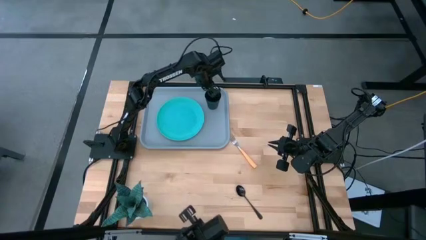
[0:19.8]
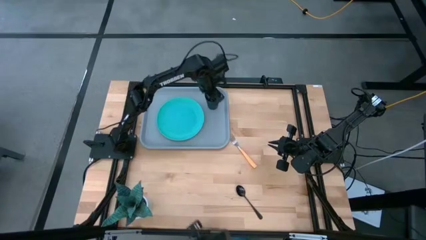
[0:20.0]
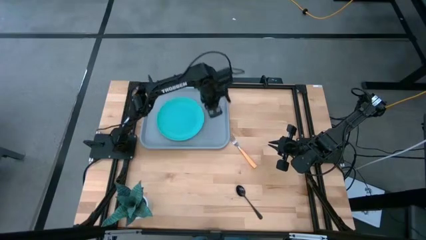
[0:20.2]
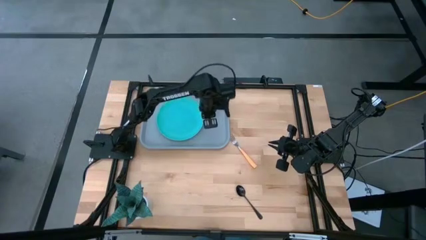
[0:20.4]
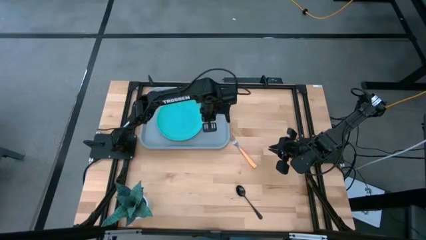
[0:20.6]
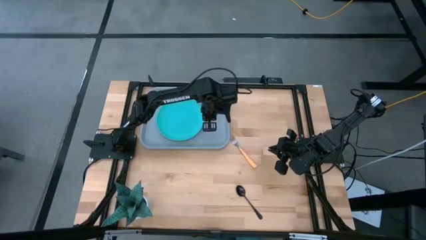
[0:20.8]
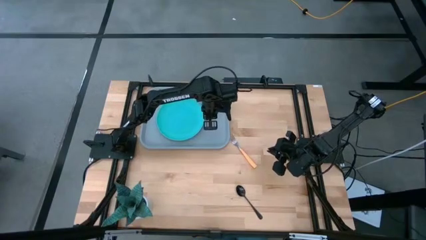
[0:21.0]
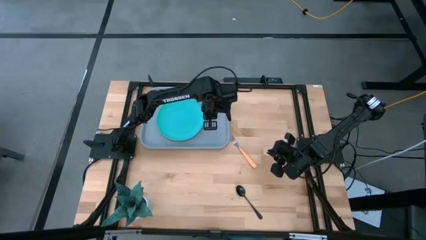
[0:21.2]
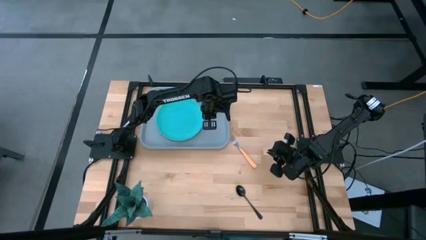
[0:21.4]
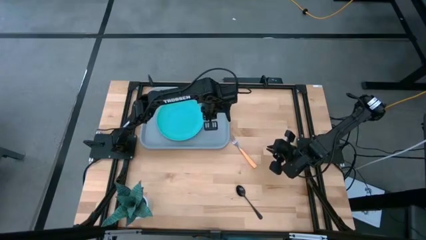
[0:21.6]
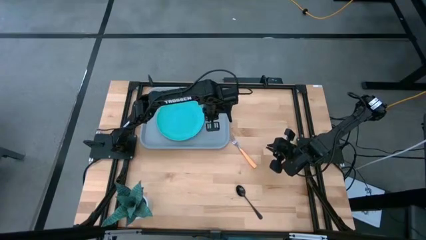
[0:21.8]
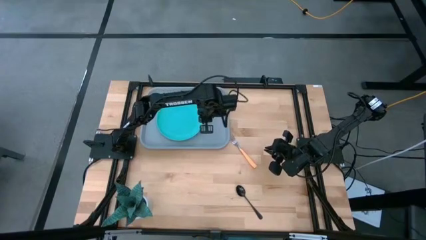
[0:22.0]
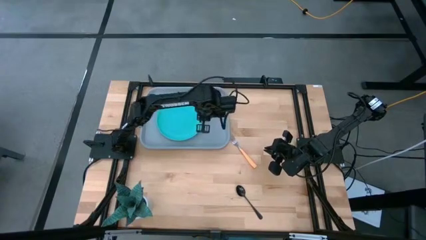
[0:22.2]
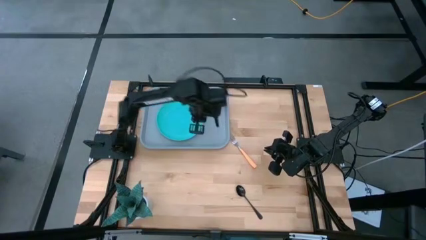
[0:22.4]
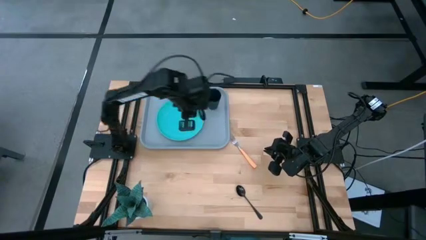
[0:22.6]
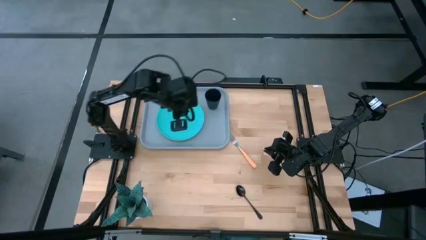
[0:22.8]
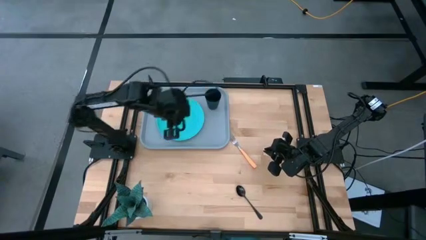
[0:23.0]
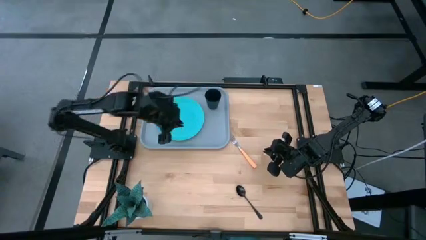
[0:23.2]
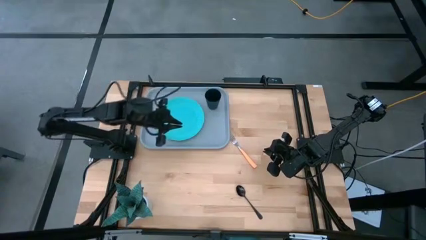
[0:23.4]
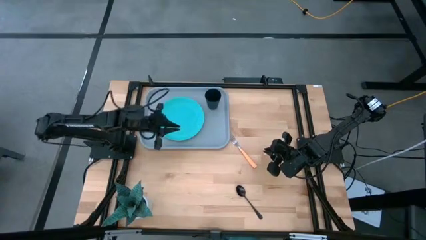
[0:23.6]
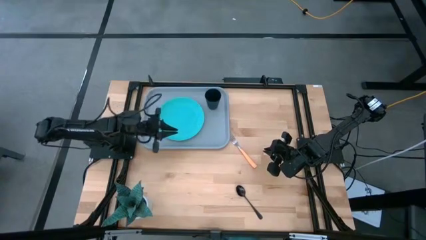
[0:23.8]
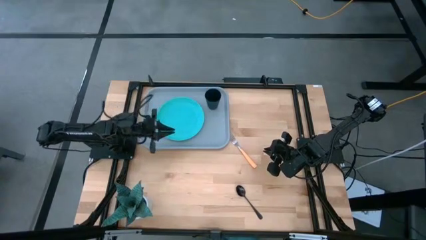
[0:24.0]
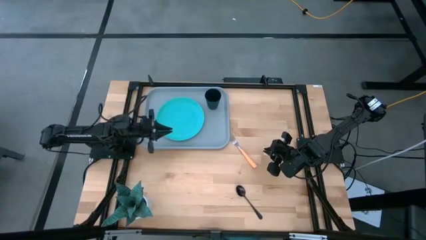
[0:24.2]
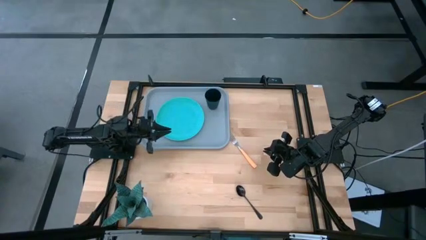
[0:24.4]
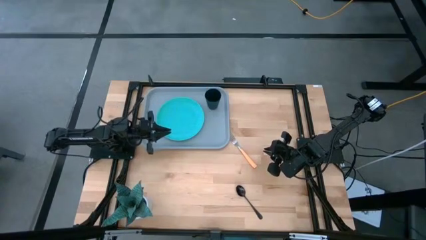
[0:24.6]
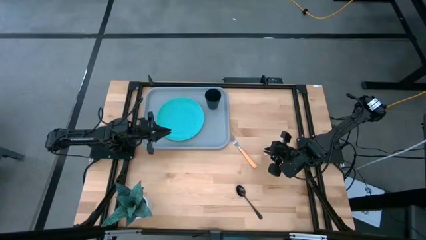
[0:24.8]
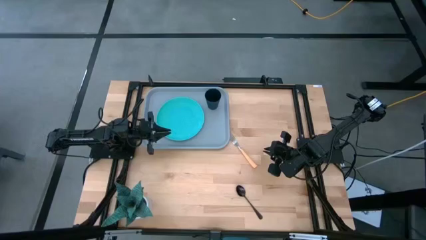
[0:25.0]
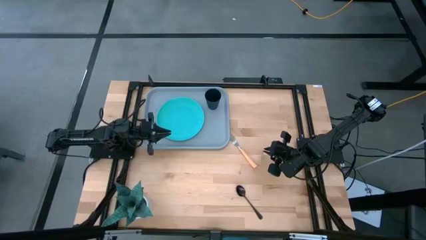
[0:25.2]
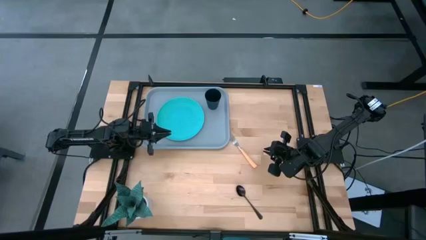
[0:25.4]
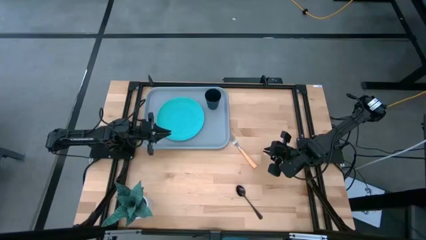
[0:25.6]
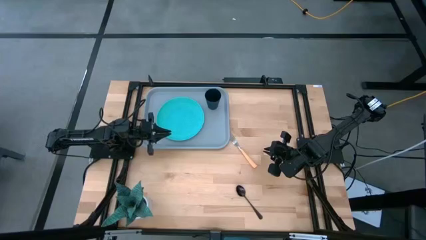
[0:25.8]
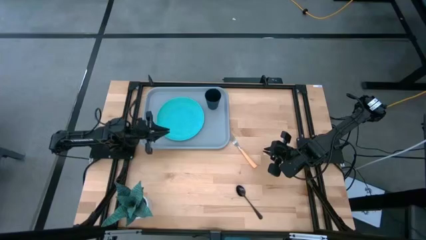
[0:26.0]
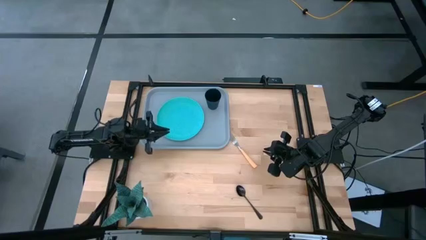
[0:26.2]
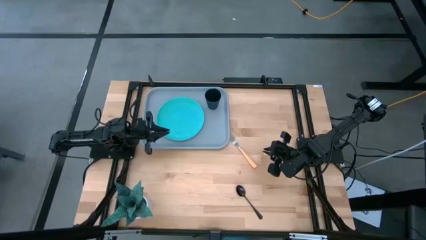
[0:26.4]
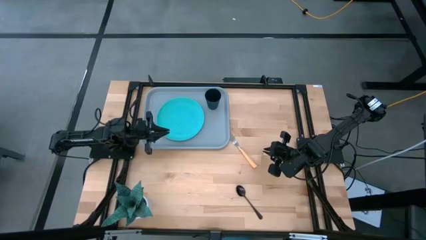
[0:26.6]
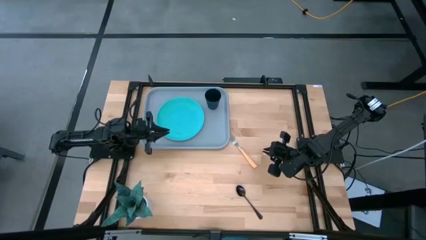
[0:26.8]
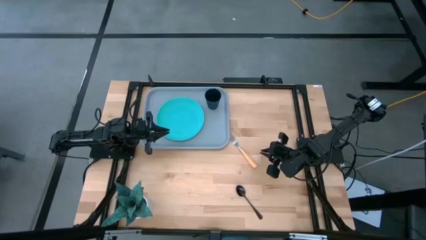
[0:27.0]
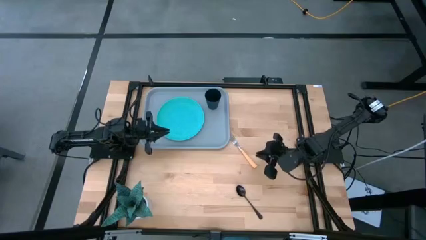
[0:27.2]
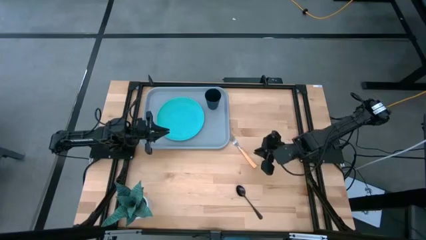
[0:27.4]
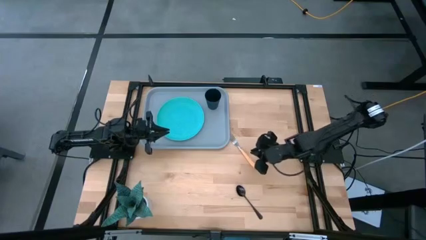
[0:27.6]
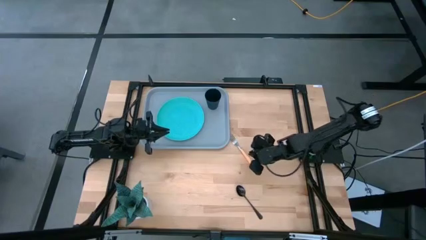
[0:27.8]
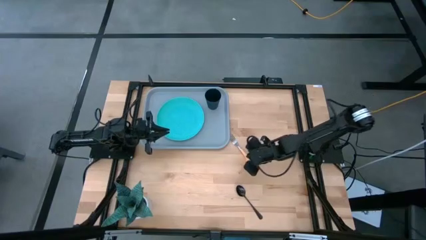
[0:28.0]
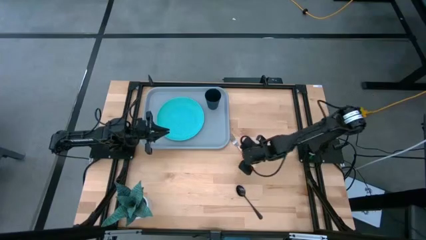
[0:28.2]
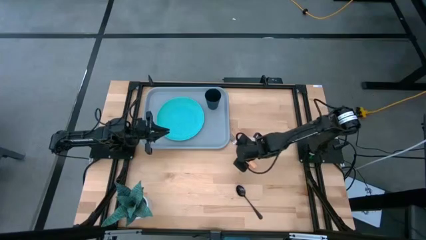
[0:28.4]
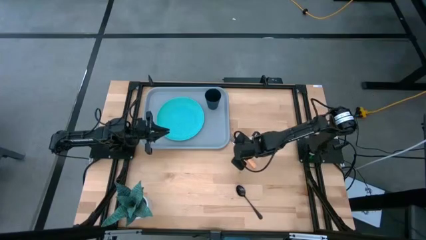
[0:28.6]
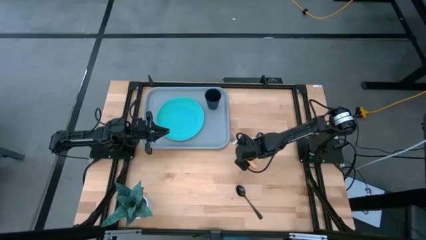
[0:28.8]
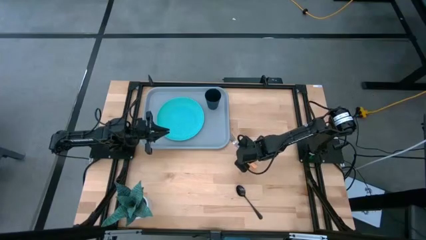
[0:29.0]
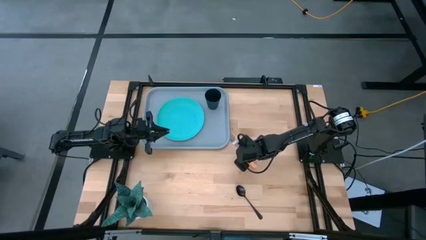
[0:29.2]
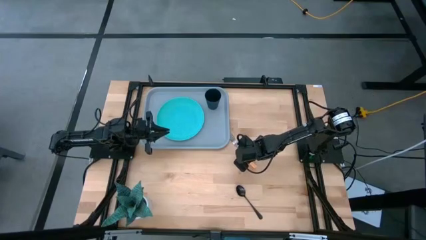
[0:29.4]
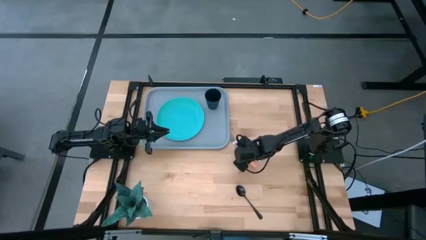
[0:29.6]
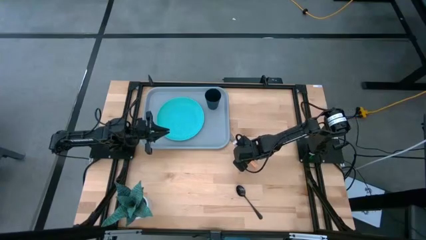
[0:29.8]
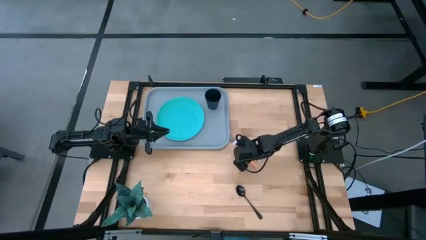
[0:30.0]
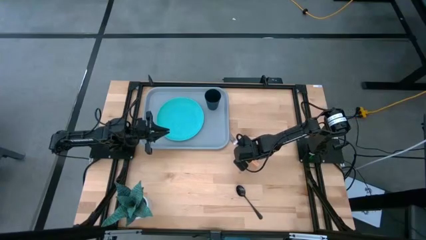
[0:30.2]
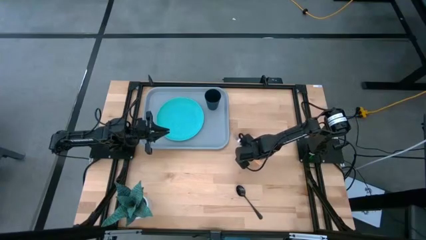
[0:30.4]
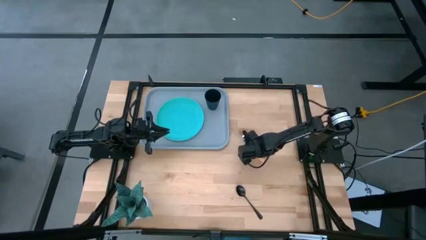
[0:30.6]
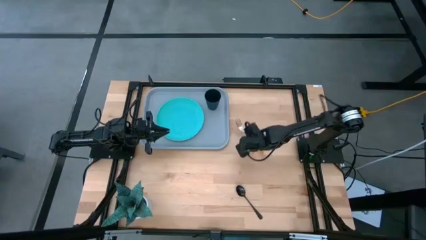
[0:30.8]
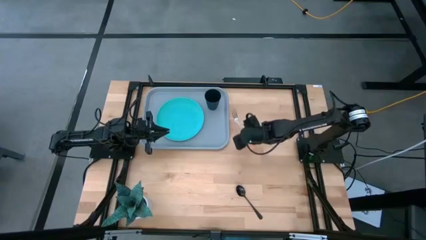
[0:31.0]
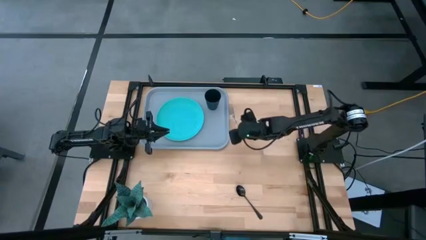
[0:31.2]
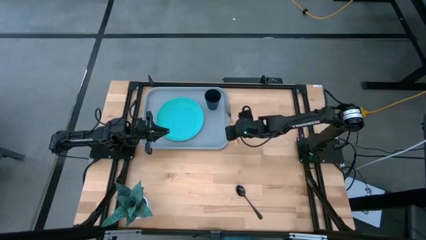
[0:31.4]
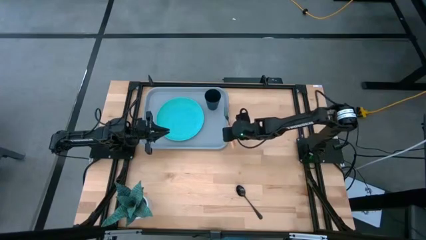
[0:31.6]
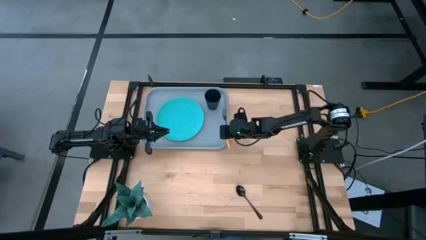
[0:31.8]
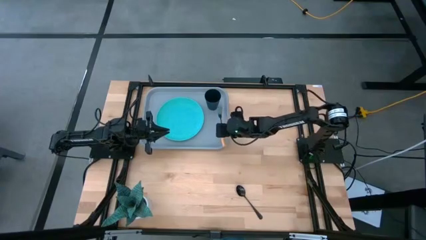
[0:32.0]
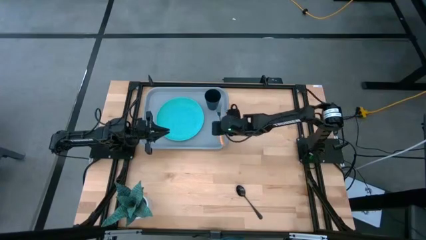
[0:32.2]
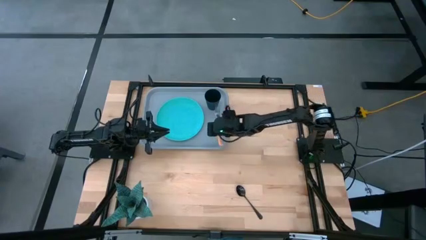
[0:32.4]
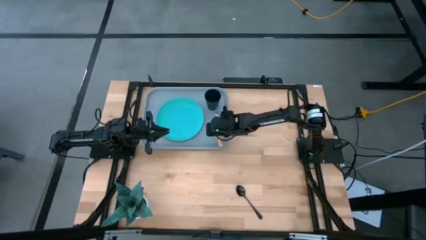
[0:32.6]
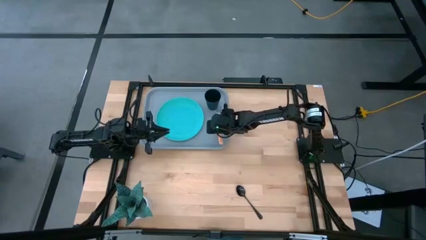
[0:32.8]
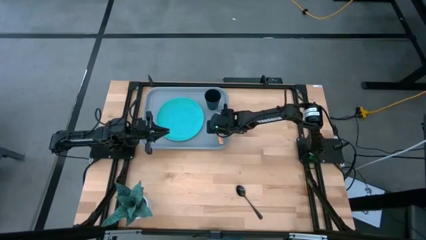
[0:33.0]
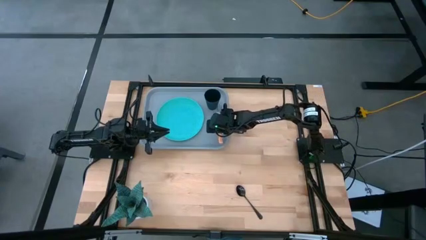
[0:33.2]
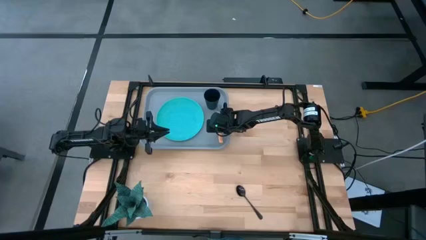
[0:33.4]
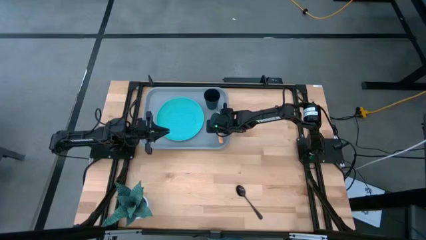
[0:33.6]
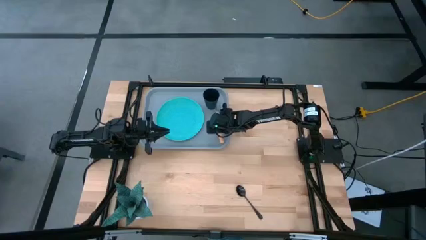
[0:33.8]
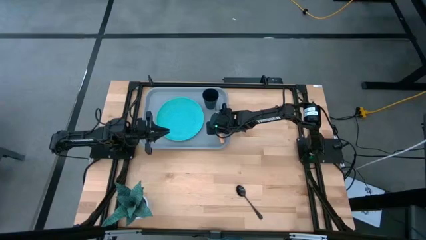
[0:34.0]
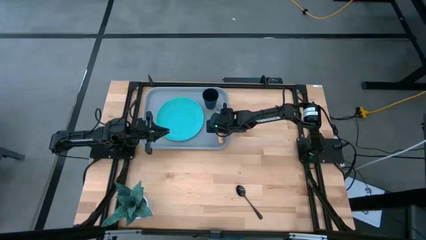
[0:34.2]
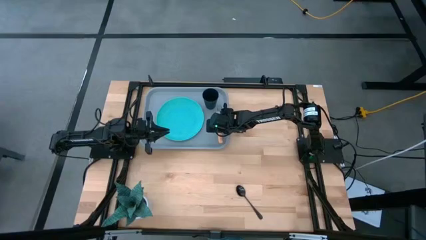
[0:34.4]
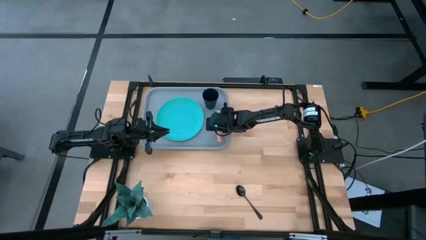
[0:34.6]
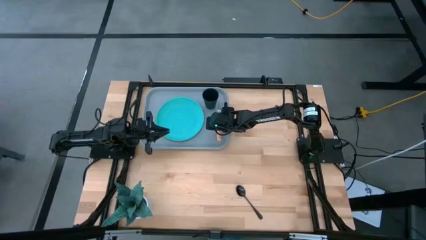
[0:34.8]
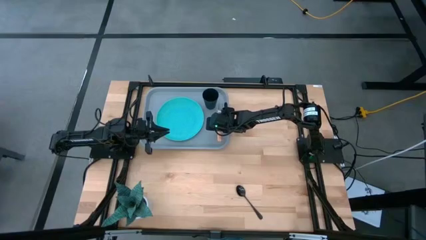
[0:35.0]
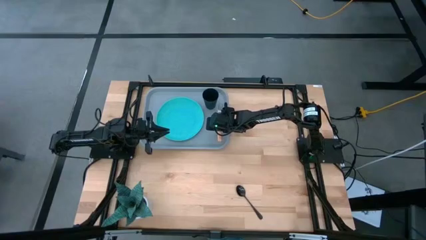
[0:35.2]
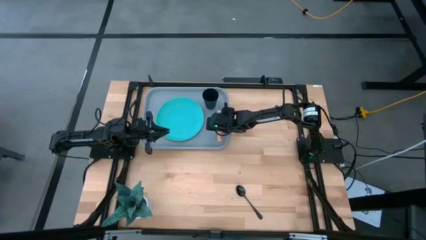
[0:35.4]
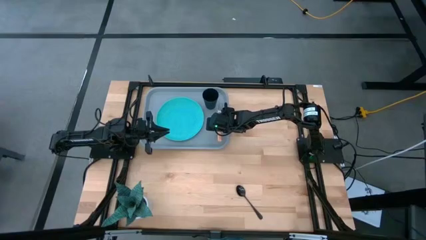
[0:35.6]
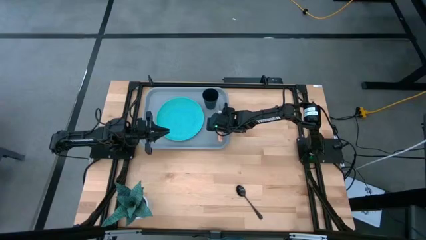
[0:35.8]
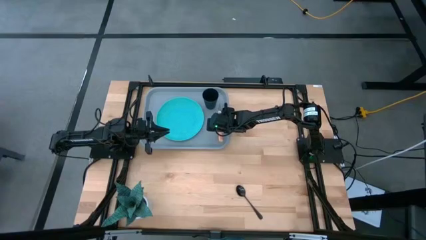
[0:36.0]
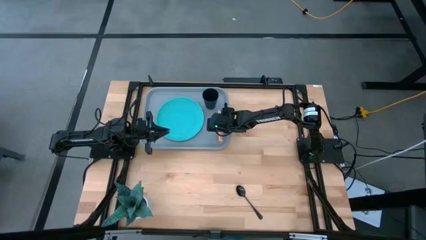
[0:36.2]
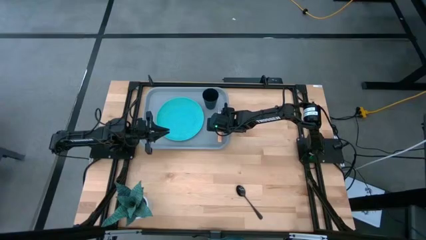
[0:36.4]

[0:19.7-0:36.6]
Task: Pick and place plate/cup/fork/spoon on tray
Put the orange fork on the serving tray to the right side of the blue plate
